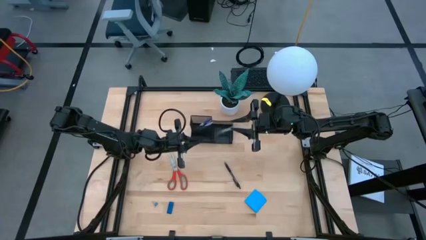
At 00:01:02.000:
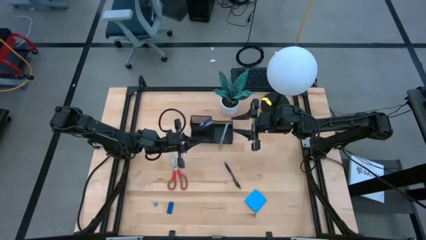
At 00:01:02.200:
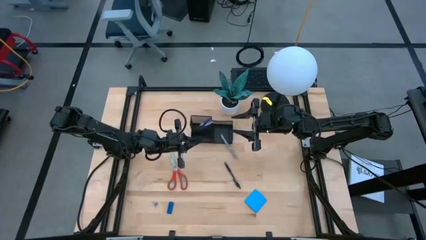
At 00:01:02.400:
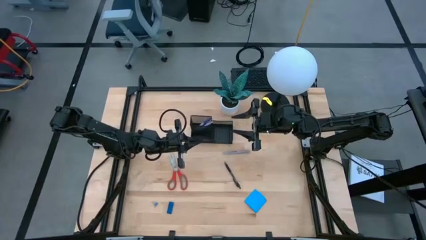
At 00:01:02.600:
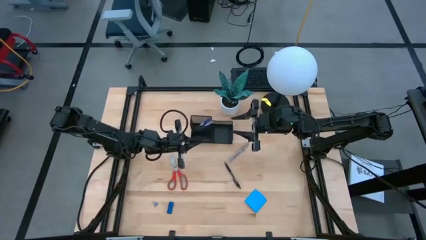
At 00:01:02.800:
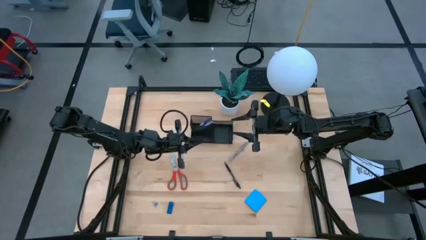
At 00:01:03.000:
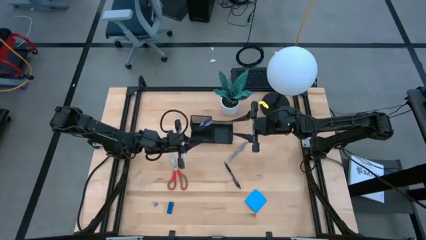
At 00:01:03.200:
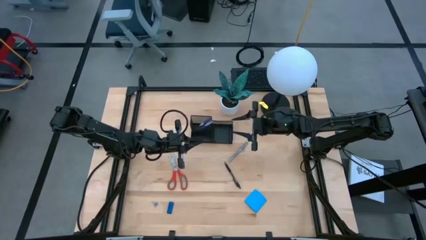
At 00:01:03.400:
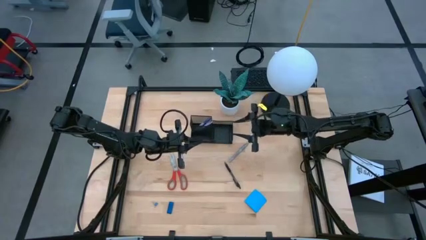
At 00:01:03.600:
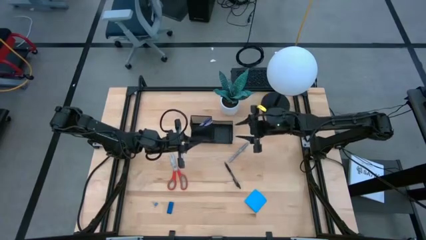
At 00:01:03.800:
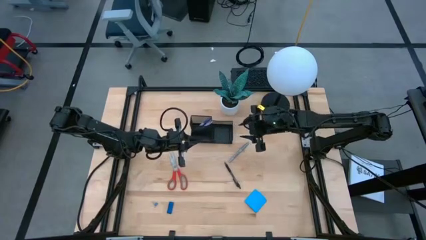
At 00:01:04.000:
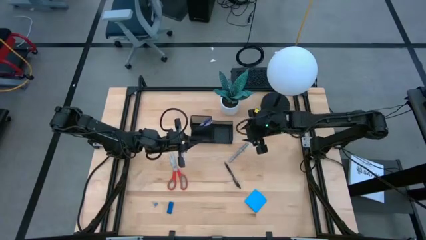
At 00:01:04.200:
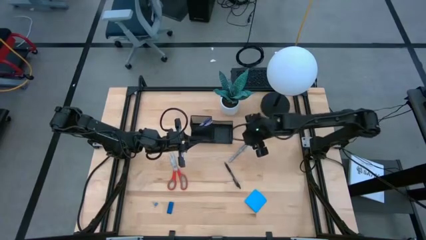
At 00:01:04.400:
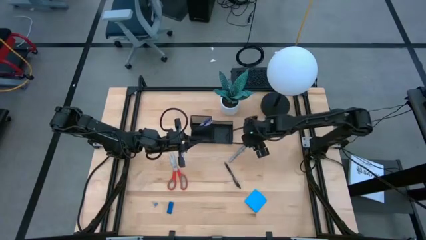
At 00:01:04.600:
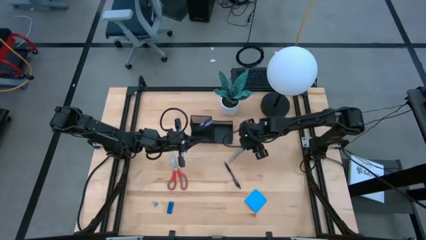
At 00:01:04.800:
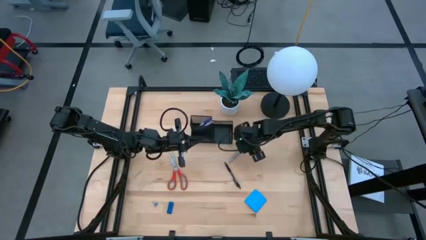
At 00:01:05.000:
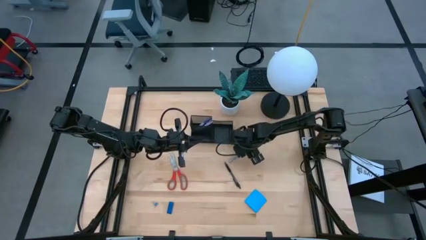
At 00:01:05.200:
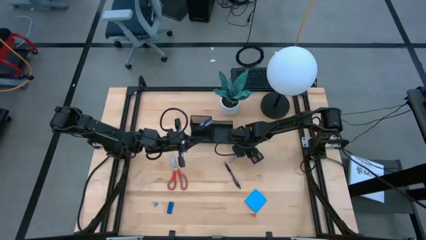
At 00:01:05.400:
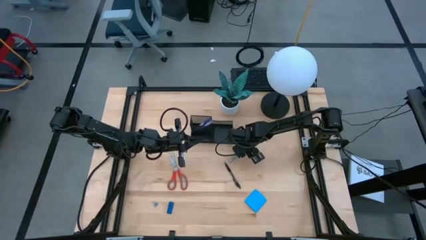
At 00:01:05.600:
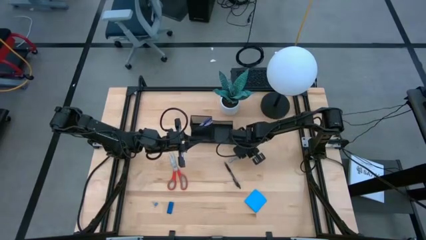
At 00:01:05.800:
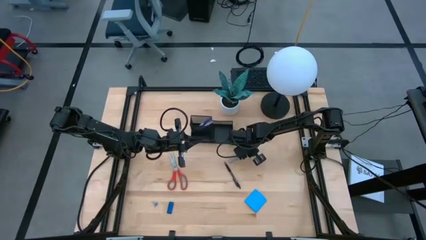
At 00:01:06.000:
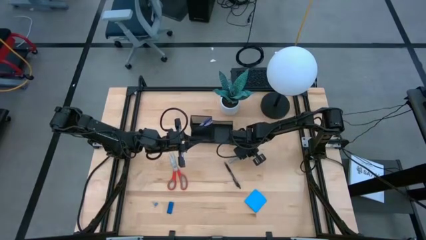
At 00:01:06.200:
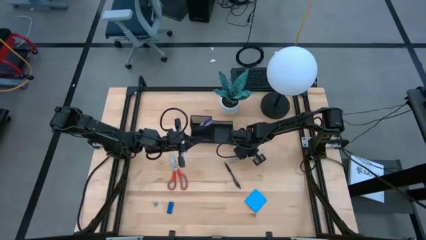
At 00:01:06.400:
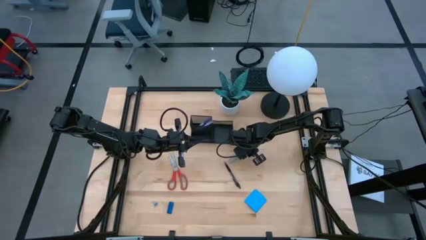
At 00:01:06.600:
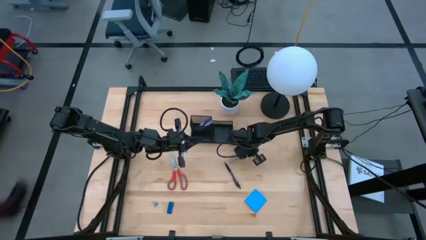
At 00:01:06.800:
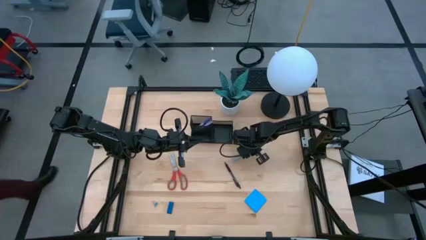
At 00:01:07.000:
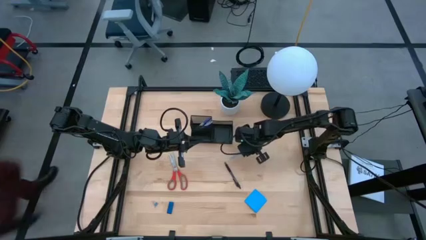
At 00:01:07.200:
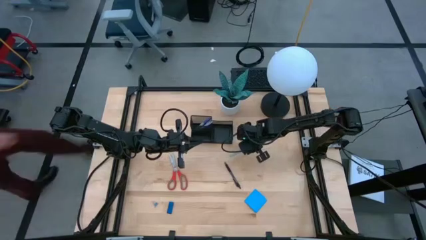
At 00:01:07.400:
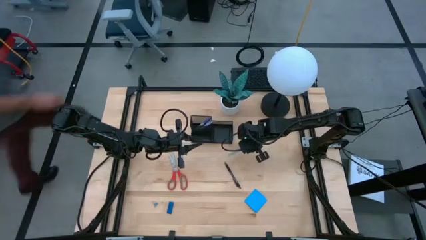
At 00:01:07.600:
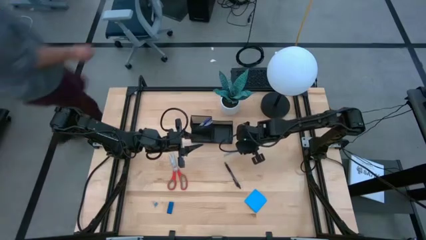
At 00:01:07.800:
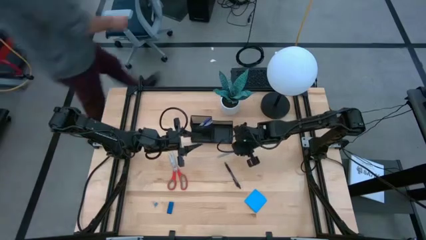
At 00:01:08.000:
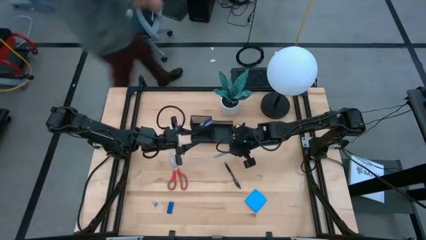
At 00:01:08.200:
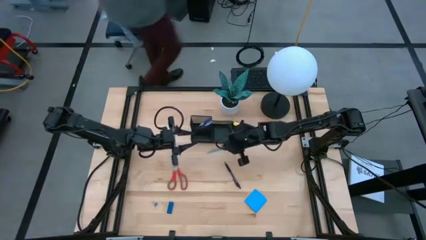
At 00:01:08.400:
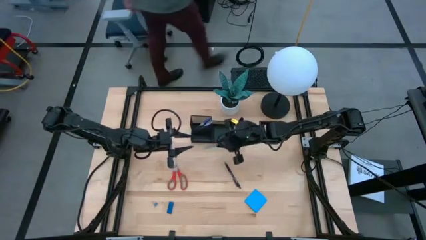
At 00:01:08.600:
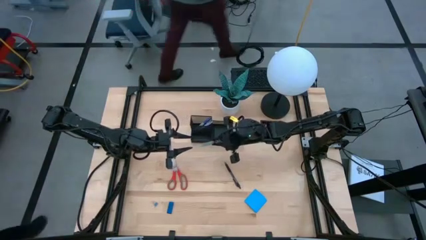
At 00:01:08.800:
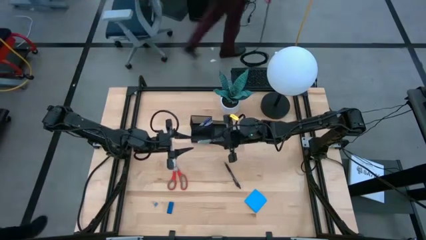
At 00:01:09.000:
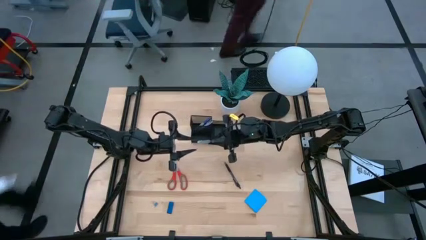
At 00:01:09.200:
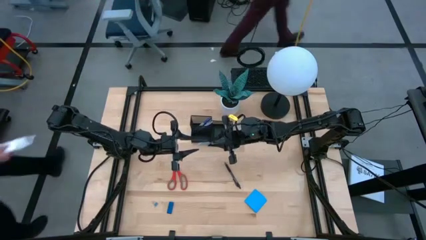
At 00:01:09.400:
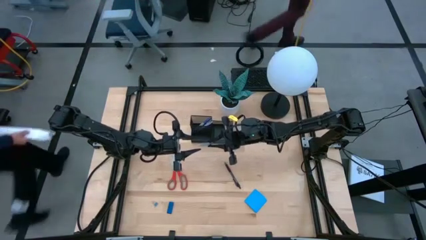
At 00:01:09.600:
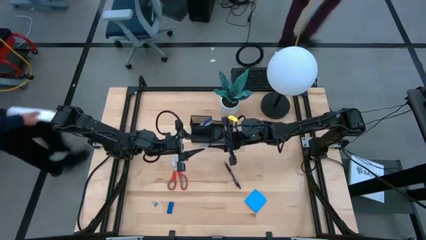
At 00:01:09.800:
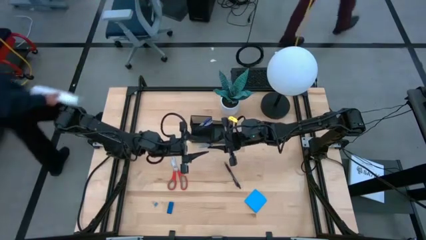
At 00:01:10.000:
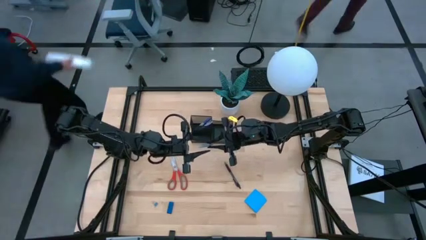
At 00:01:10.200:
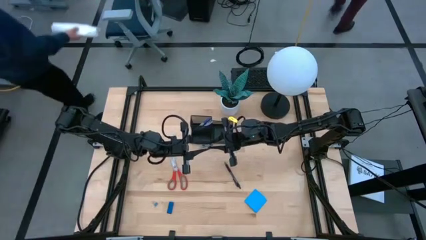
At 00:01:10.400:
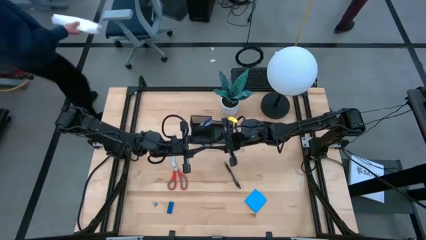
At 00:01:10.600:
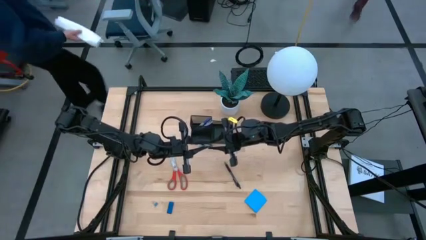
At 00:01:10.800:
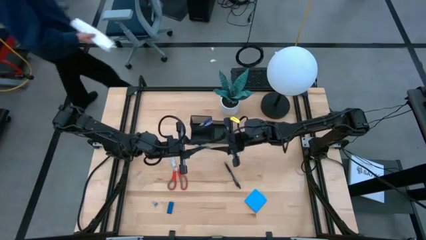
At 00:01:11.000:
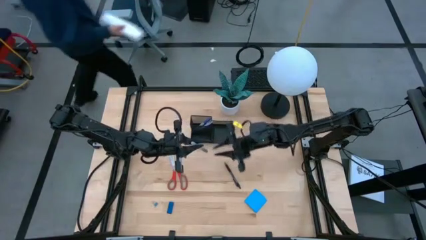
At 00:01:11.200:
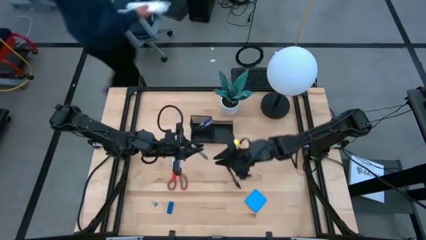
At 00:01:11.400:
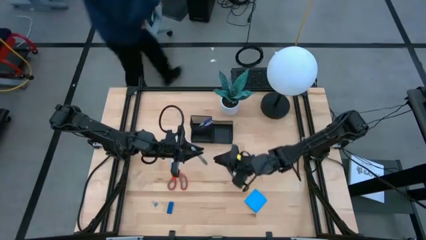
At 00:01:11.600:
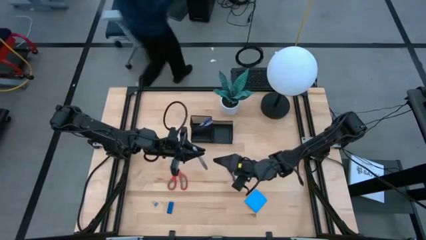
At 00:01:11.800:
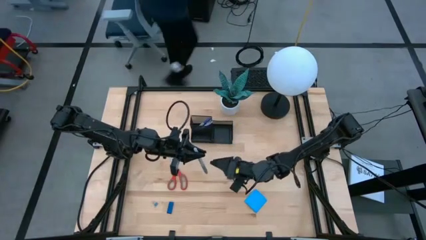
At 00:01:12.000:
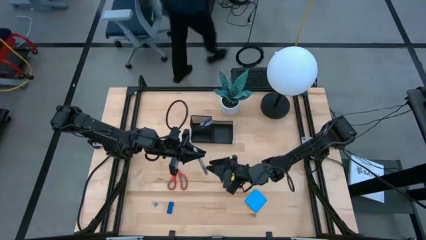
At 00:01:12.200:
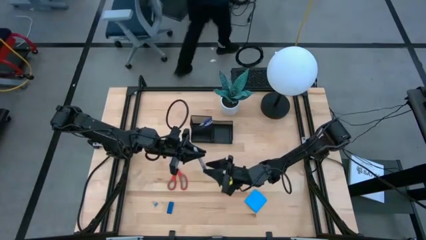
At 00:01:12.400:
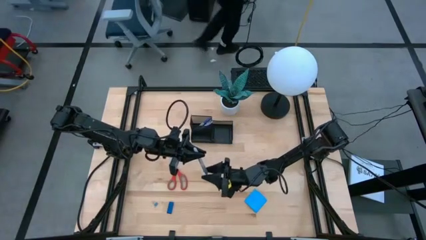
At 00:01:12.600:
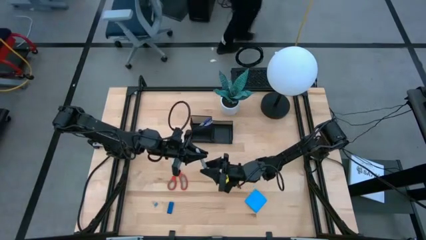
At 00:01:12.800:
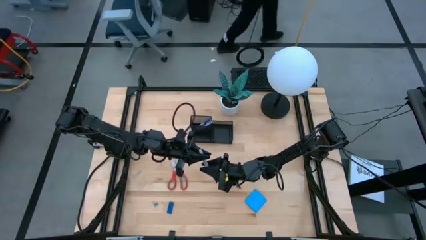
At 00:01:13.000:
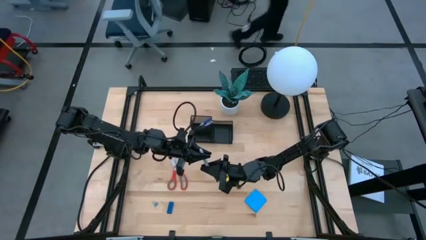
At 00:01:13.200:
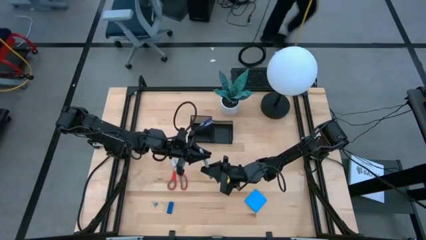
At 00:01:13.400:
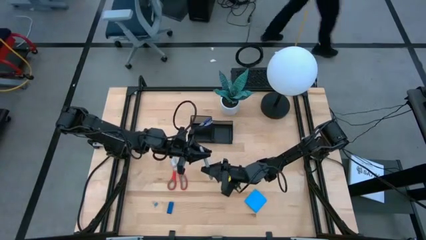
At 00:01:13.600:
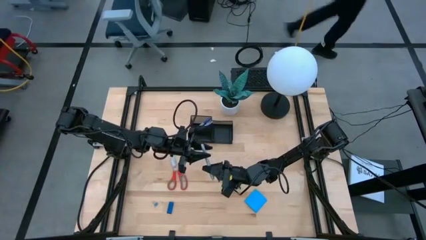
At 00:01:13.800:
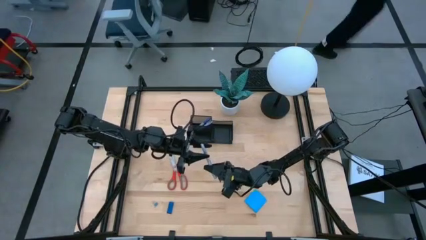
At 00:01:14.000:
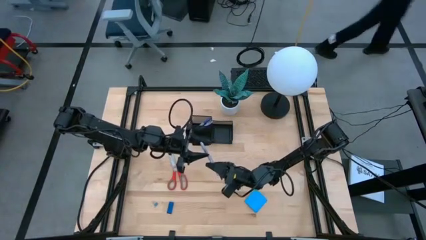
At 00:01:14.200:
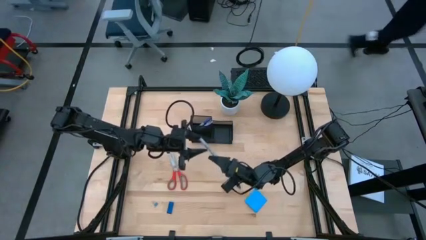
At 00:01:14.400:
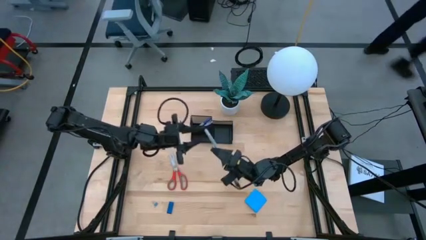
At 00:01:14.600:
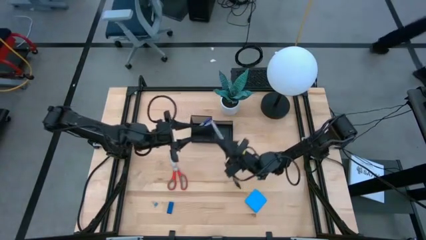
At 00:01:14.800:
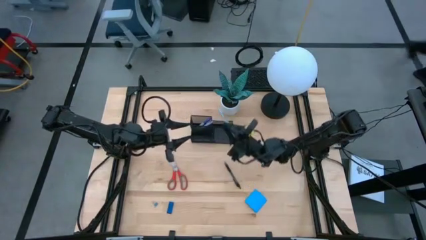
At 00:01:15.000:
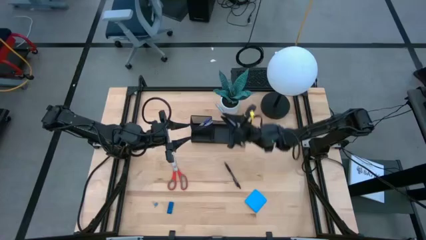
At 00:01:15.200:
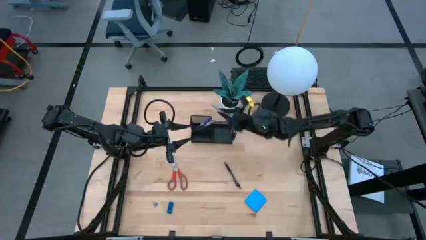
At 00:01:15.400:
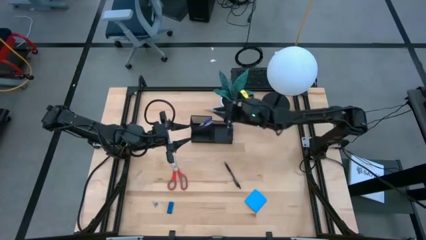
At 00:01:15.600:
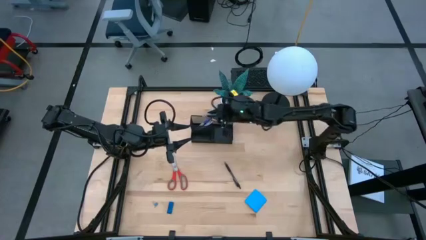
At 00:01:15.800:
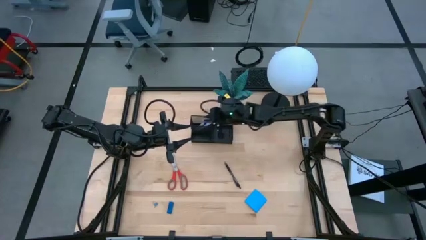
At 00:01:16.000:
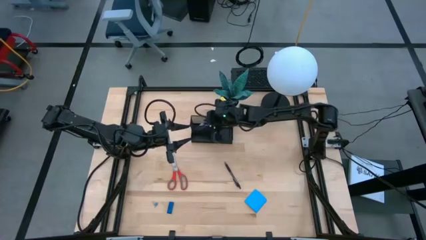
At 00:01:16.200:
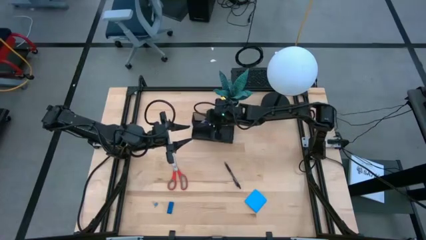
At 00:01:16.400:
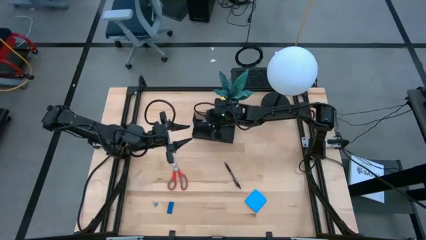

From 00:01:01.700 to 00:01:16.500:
Task: Pick and place office supplies into organizer
Put the gray marker into the black desk organizer
